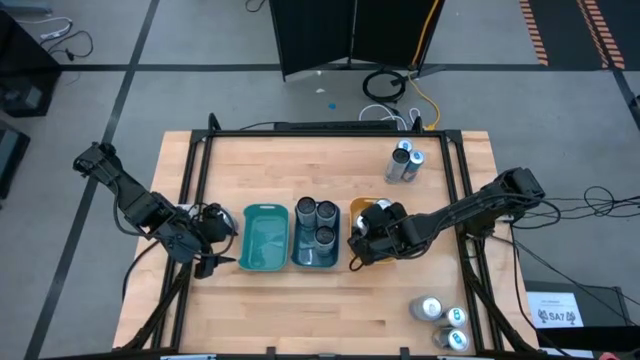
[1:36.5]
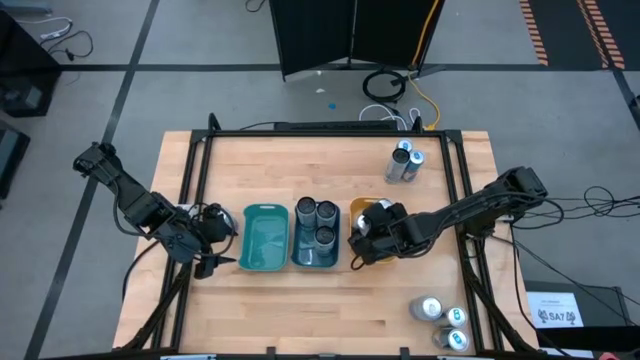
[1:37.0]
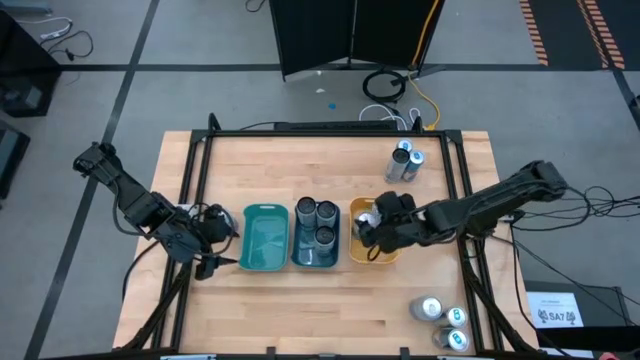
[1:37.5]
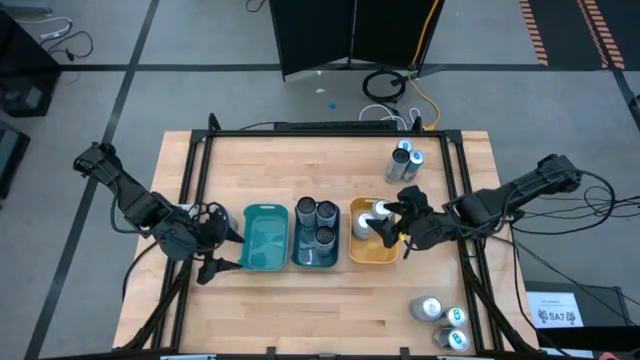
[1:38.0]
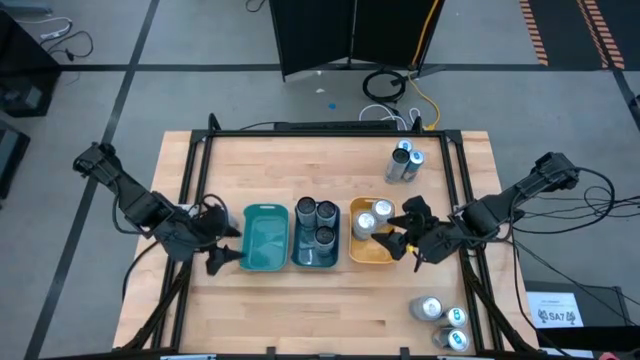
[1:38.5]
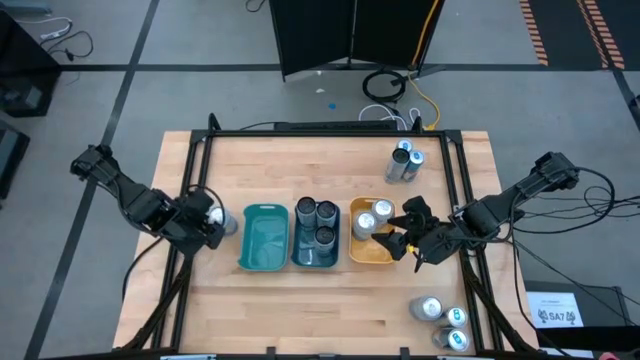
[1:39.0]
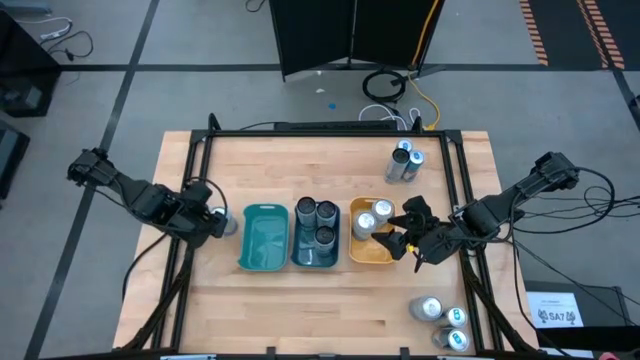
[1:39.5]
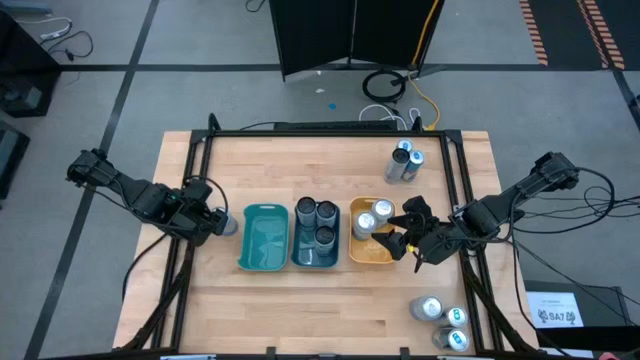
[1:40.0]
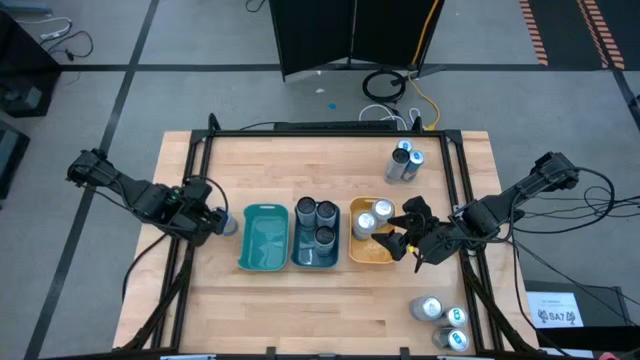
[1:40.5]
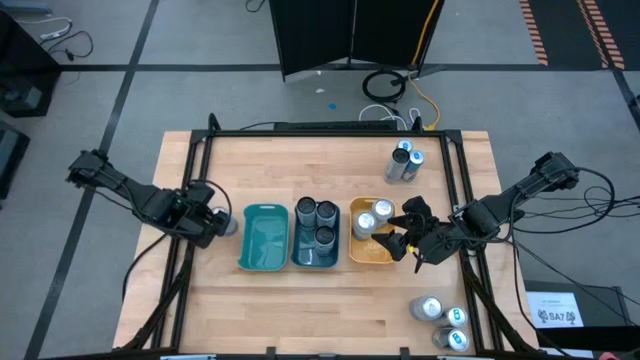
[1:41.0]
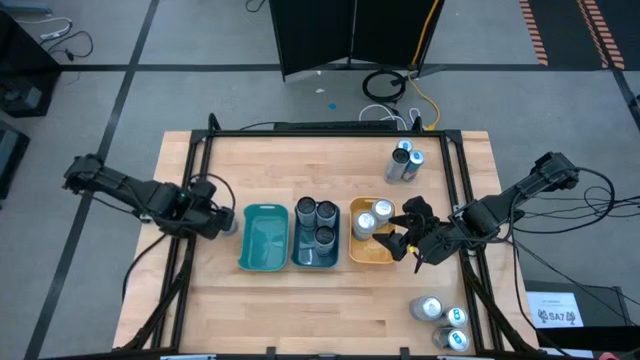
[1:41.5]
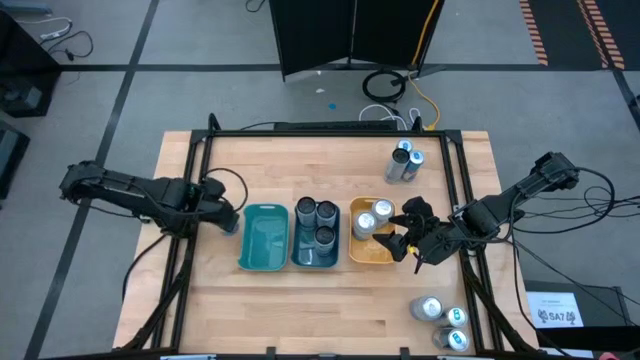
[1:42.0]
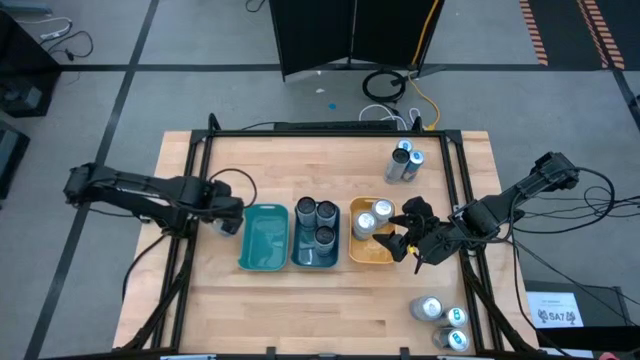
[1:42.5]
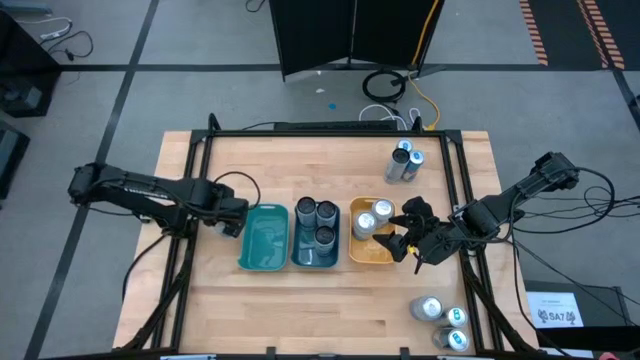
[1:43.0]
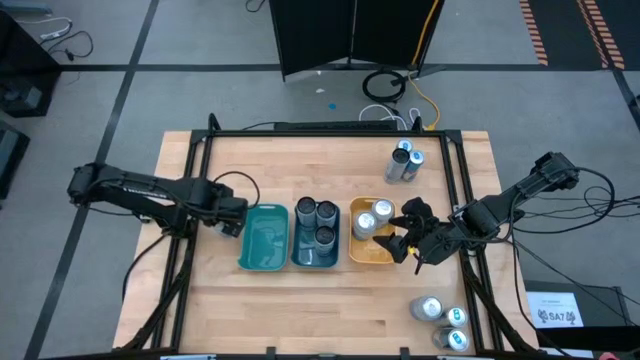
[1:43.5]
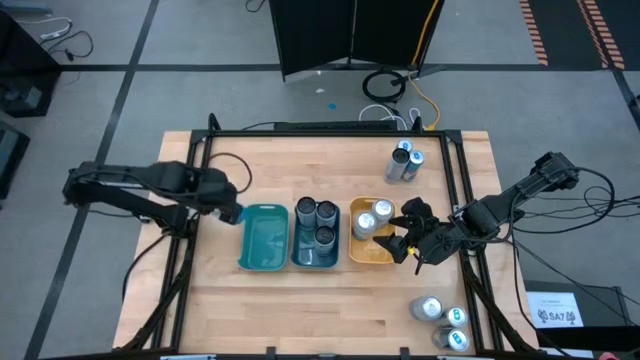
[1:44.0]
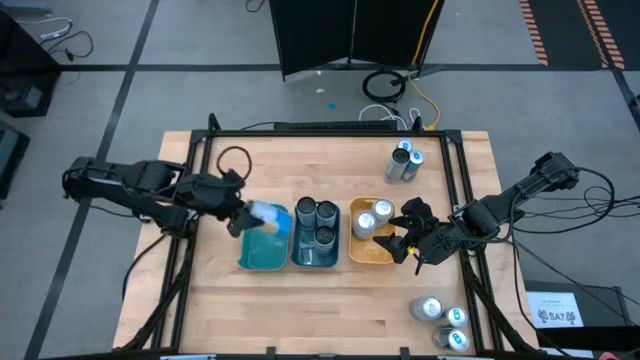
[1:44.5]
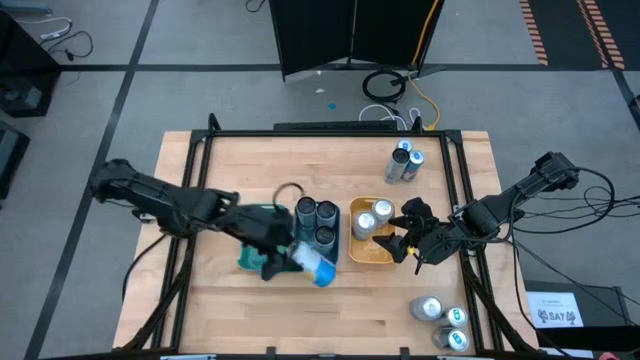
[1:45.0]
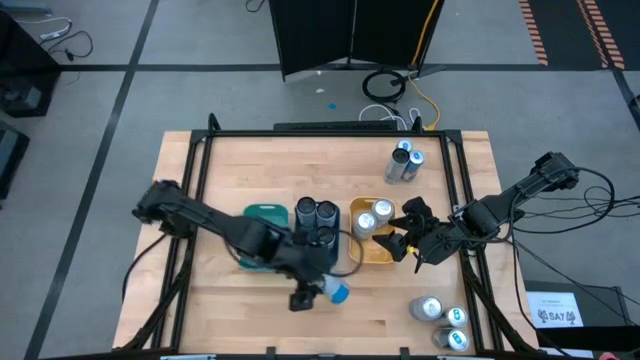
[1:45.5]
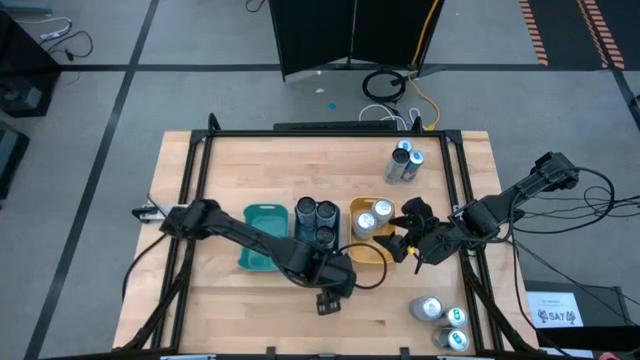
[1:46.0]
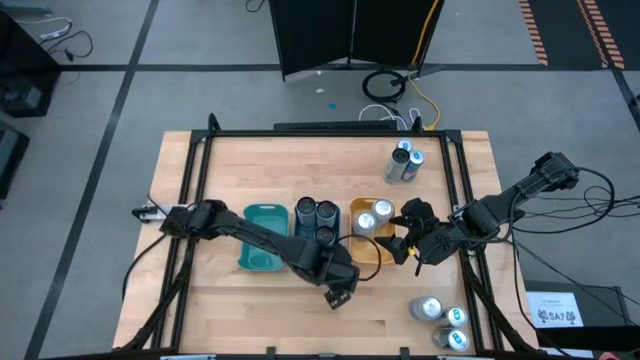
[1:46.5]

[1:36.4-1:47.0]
Task: Sort soda cans
Move the top silver soda can to the center of the table

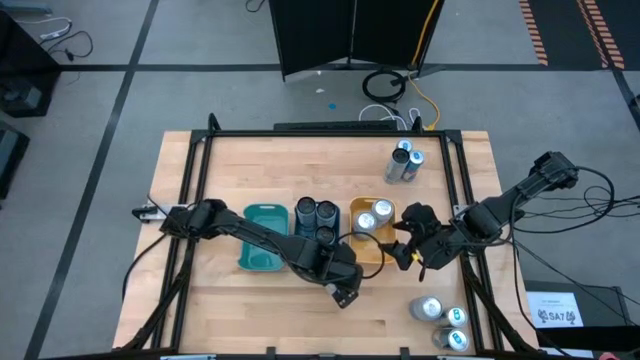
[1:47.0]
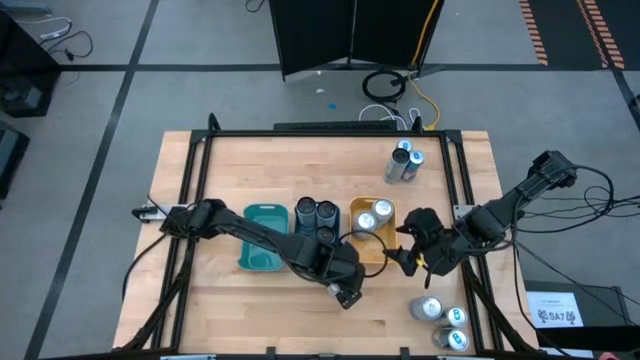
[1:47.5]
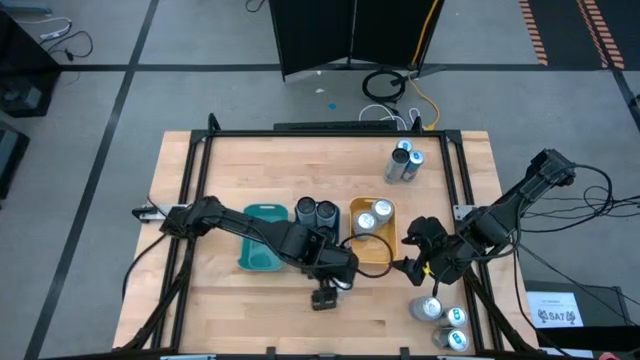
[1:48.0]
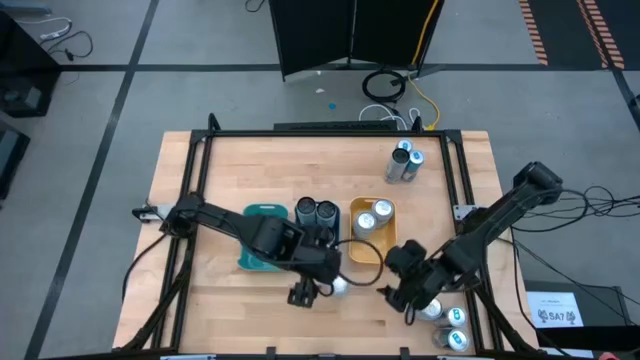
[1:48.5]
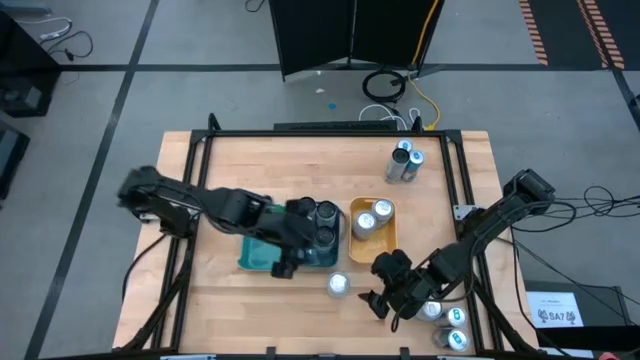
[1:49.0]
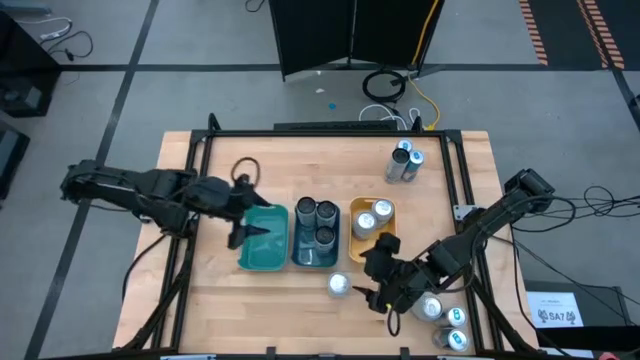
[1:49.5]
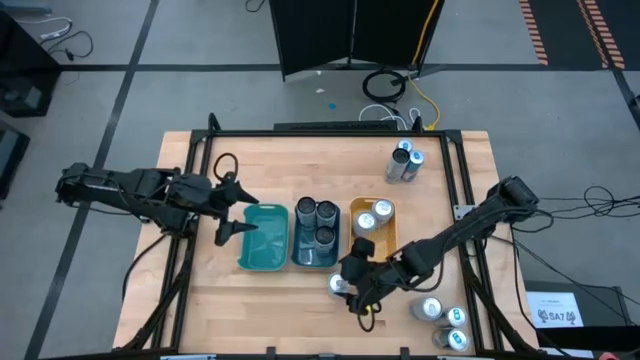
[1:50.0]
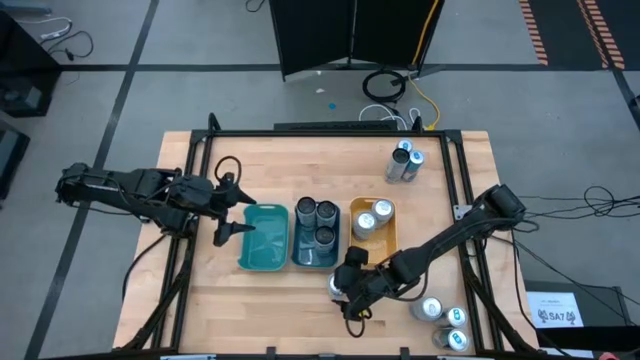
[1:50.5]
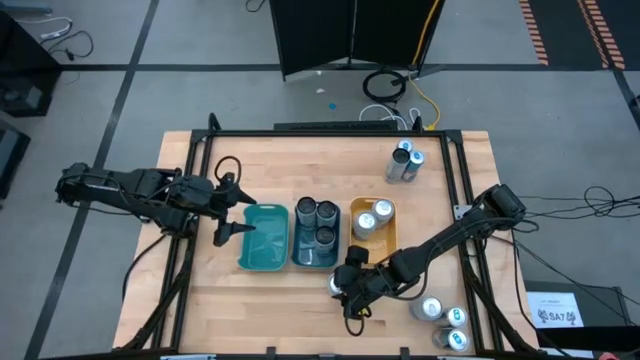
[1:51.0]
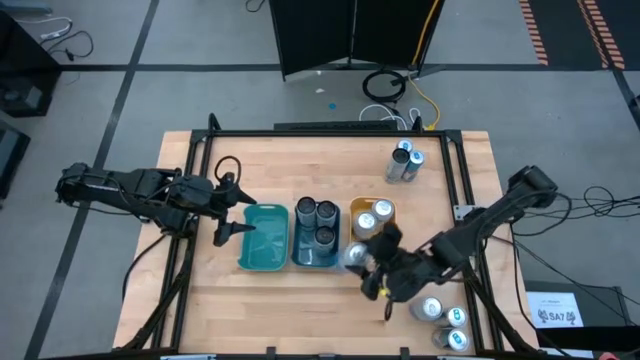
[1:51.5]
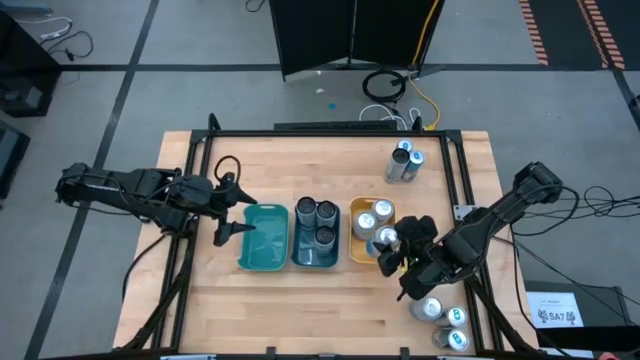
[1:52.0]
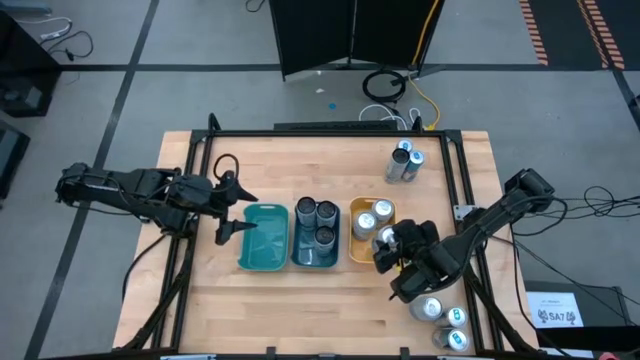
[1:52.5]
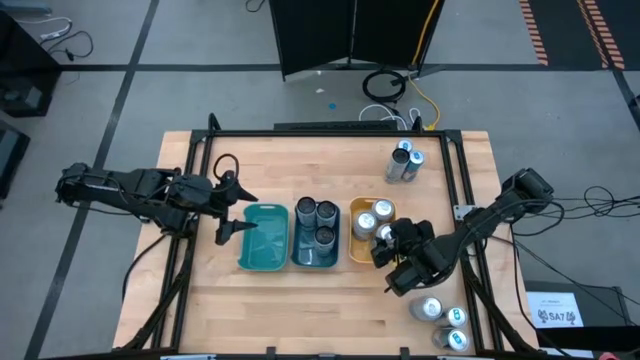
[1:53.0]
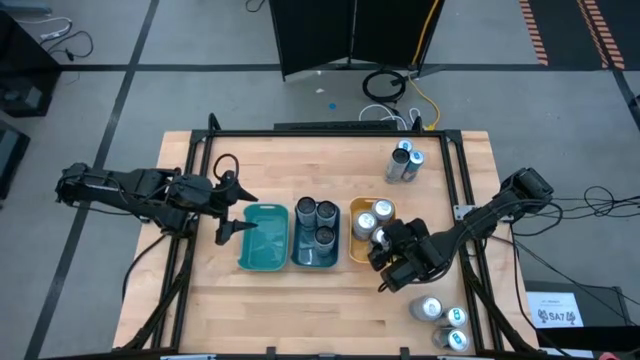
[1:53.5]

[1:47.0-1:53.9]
Put the left silver soda can into the yellow bin

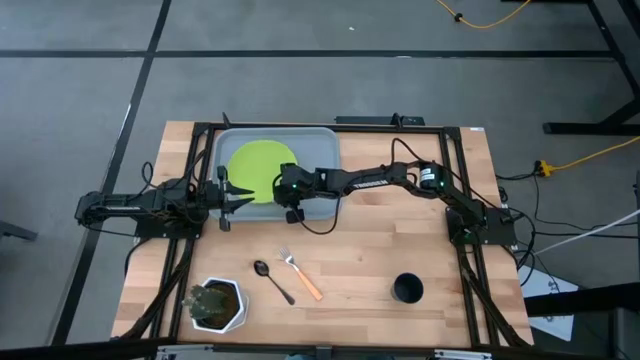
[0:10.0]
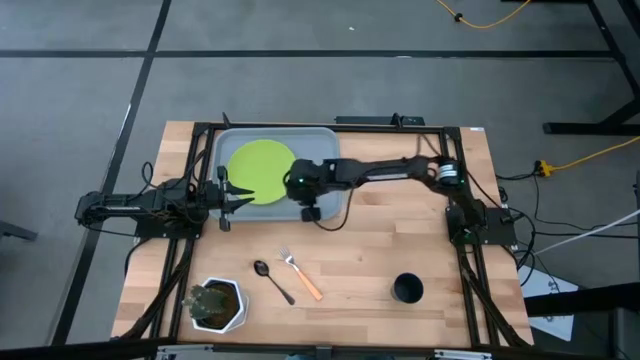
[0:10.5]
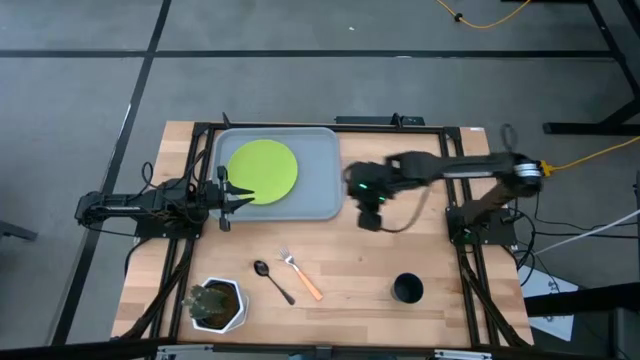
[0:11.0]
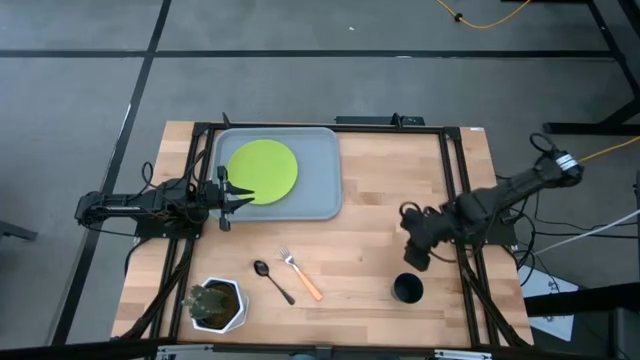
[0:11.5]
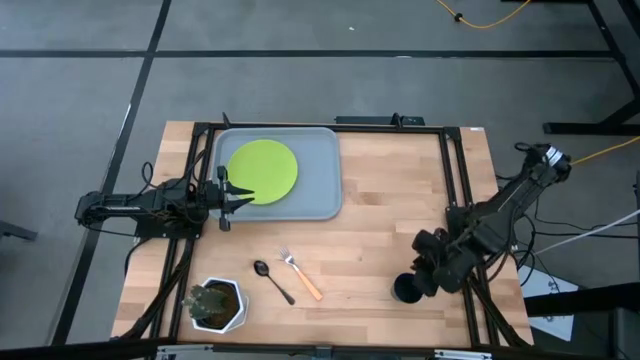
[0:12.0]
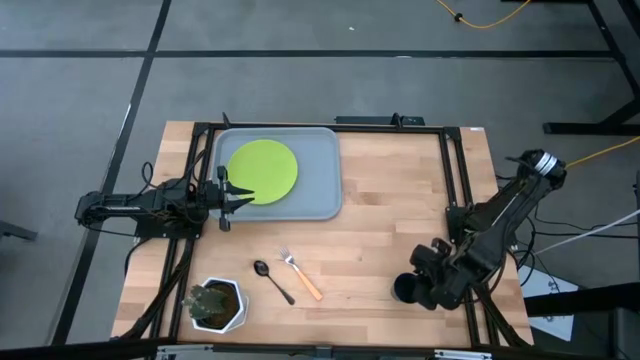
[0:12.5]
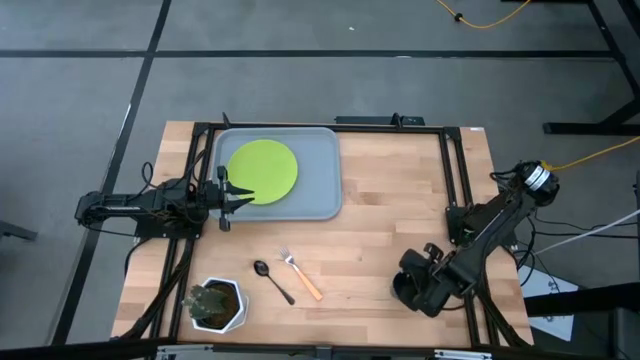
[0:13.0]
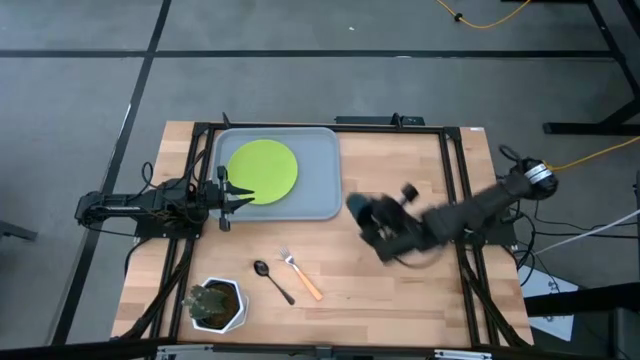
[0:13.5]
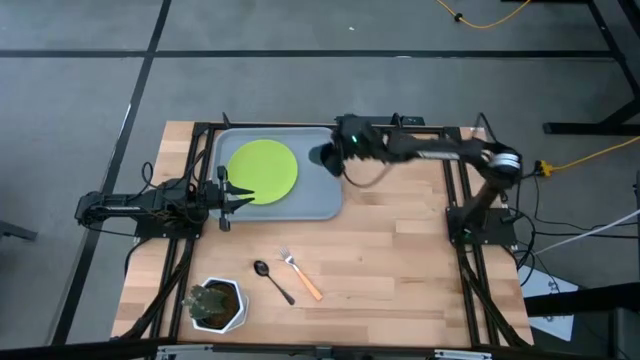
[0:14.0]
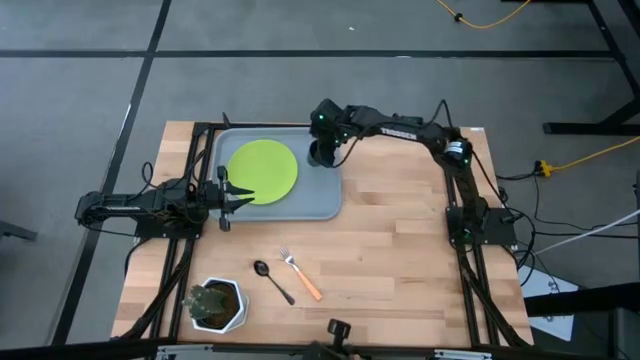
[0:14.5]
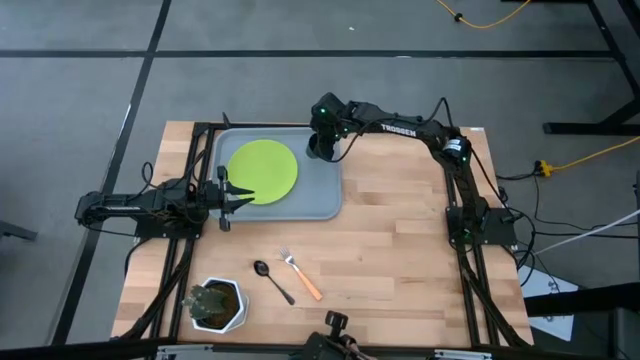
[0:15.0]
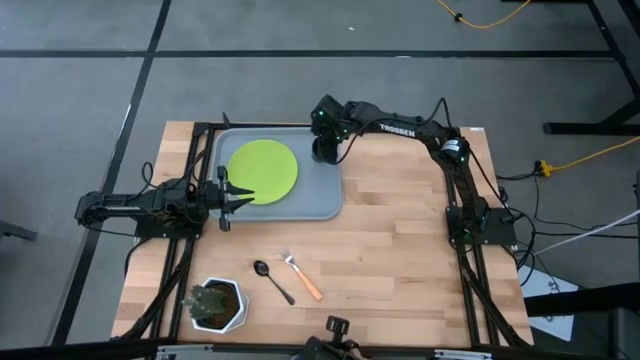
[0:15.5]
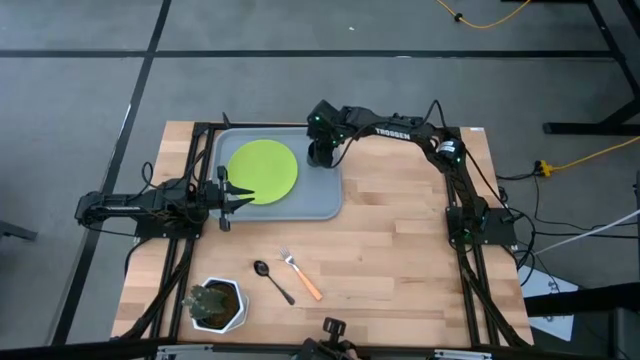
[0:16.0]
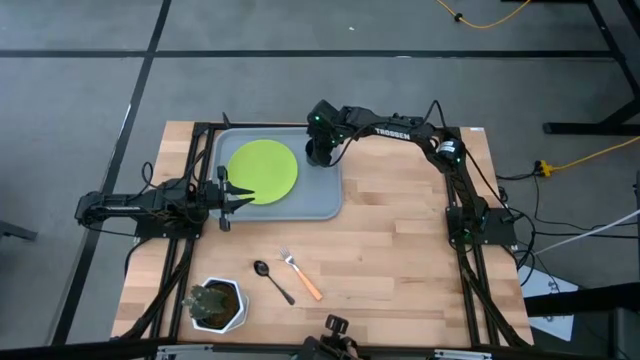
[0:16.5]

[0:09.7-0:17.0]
Task: Pick and place plate/cup/fork/spoon on tray
Put the black cup on the blue serving tray to the top right of the green plate
